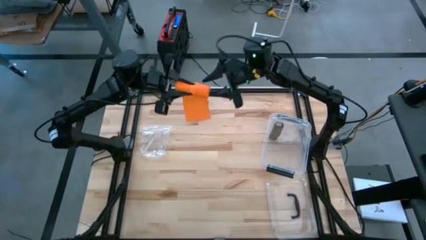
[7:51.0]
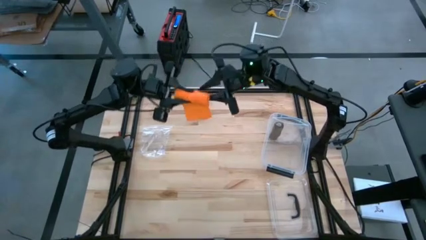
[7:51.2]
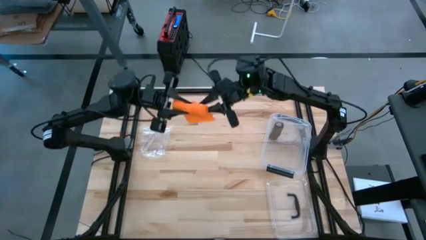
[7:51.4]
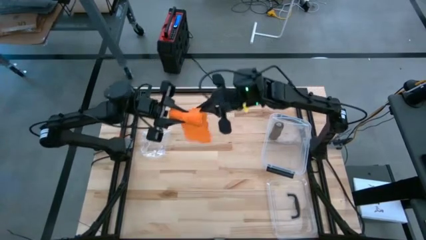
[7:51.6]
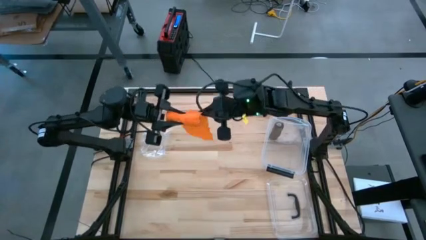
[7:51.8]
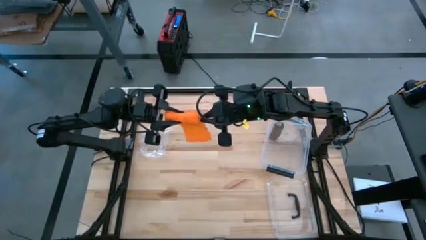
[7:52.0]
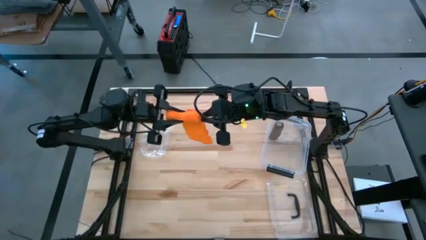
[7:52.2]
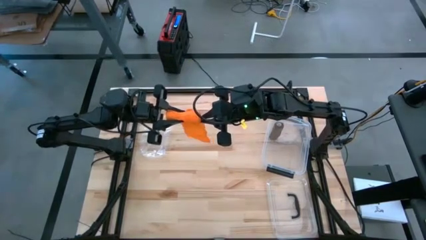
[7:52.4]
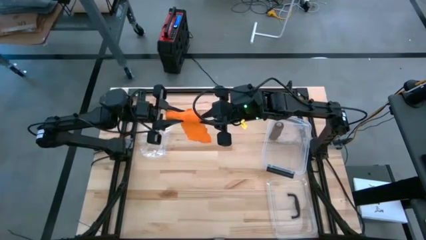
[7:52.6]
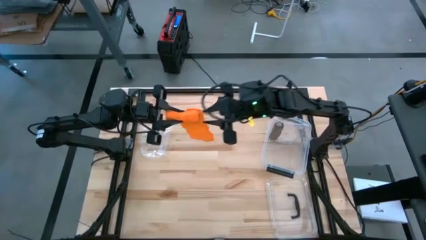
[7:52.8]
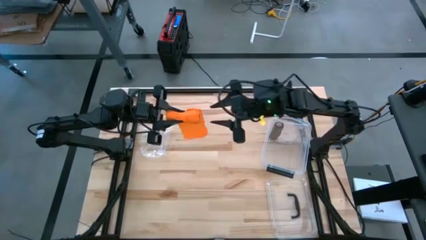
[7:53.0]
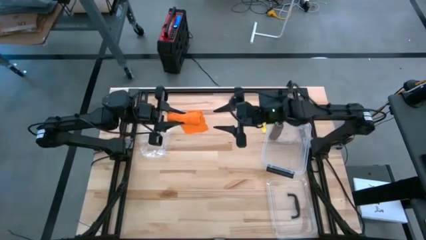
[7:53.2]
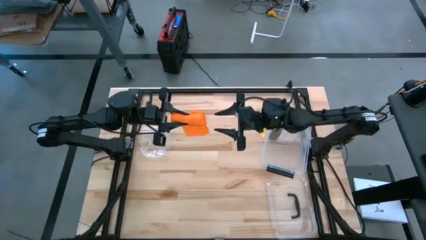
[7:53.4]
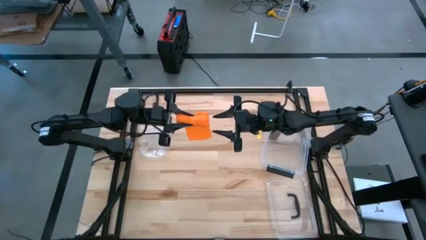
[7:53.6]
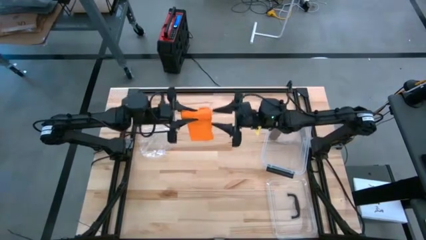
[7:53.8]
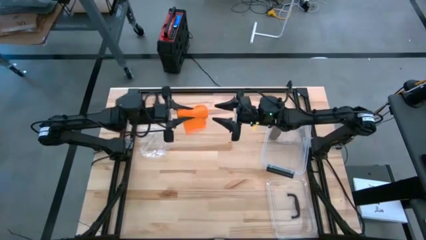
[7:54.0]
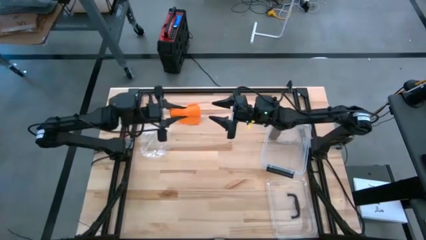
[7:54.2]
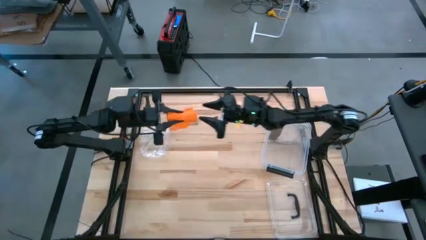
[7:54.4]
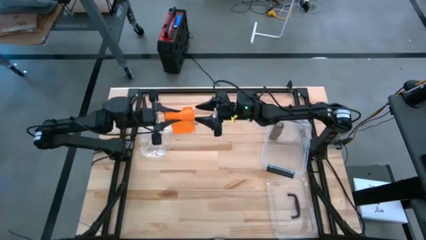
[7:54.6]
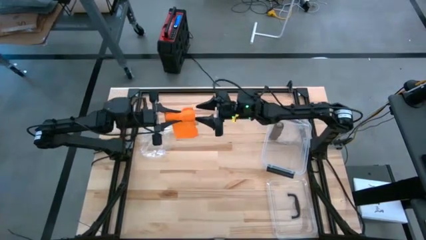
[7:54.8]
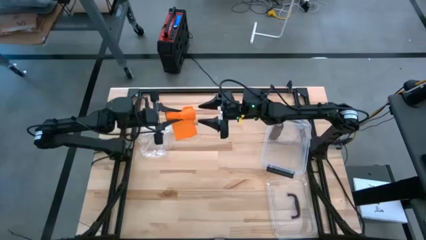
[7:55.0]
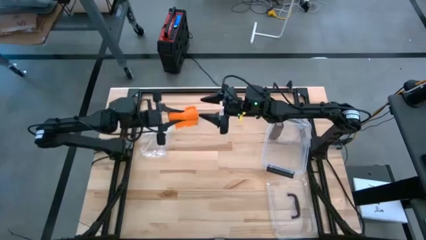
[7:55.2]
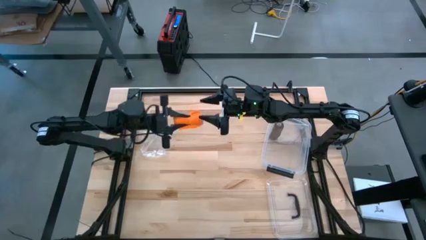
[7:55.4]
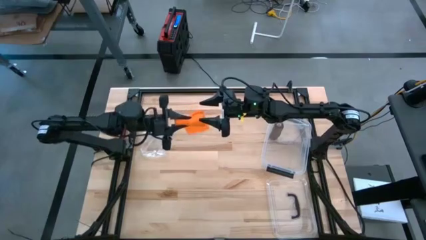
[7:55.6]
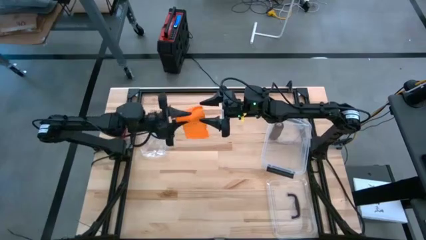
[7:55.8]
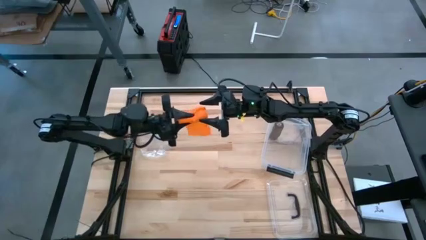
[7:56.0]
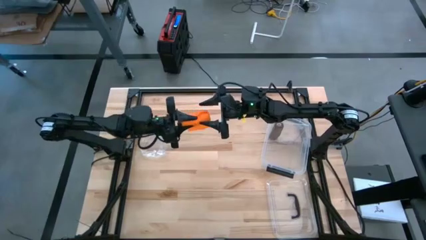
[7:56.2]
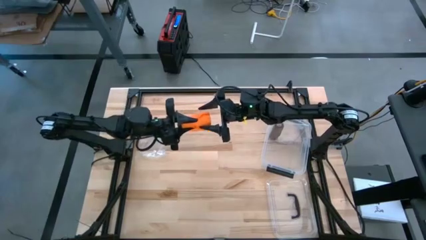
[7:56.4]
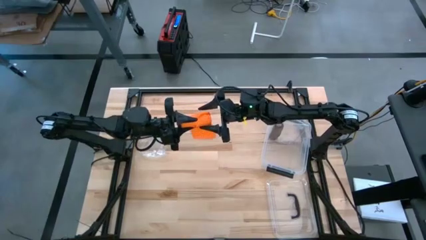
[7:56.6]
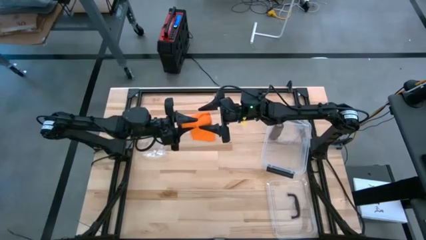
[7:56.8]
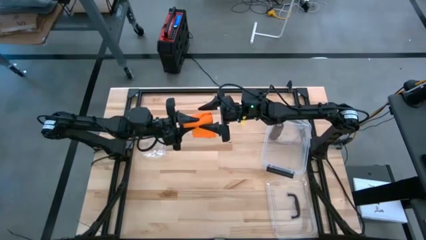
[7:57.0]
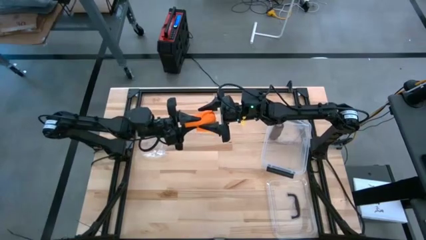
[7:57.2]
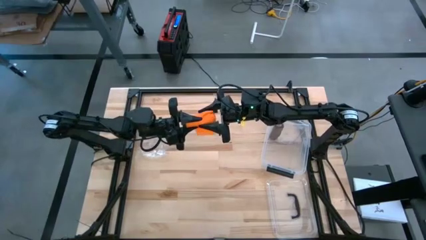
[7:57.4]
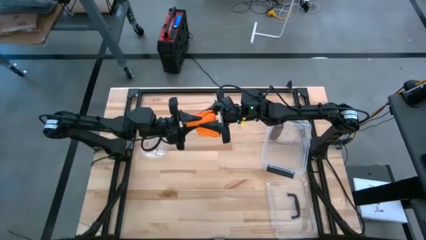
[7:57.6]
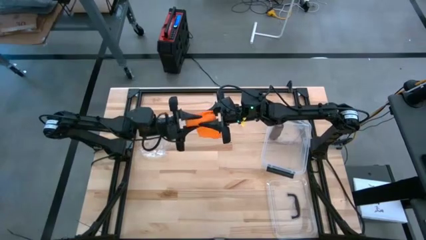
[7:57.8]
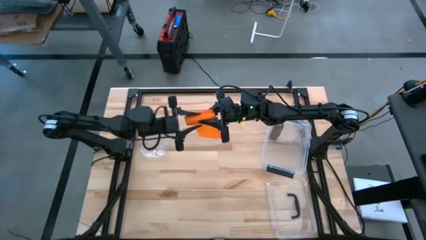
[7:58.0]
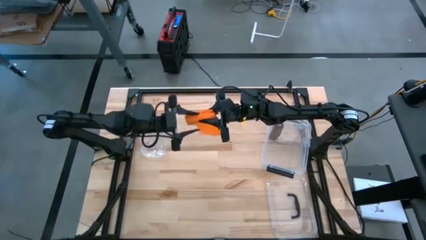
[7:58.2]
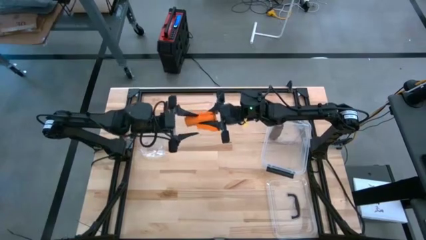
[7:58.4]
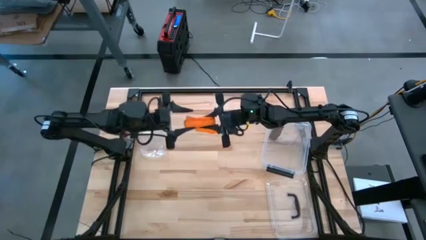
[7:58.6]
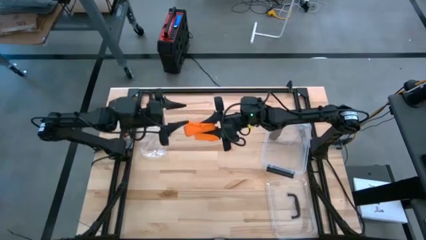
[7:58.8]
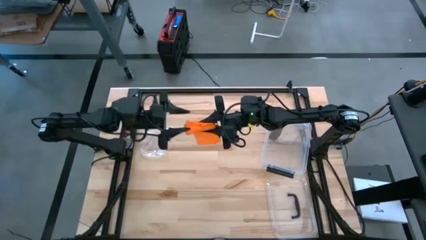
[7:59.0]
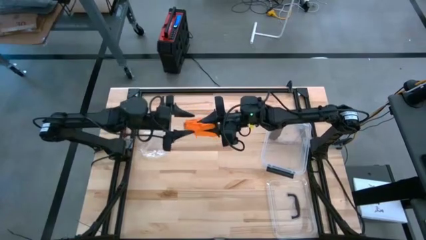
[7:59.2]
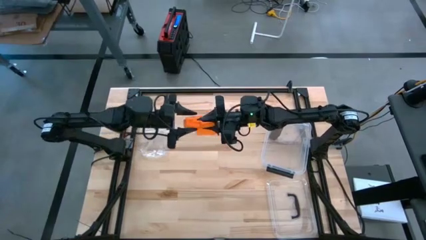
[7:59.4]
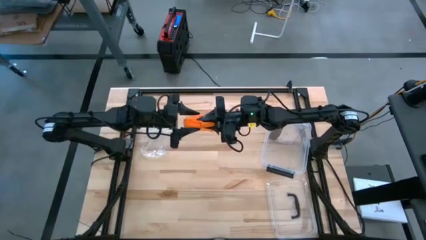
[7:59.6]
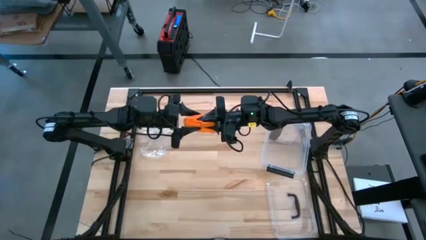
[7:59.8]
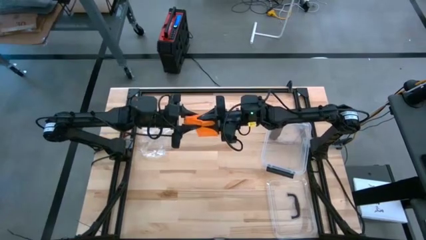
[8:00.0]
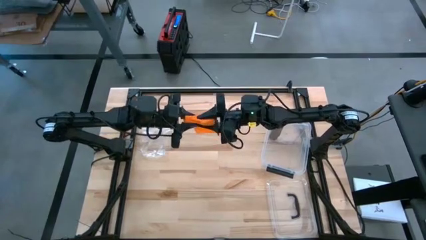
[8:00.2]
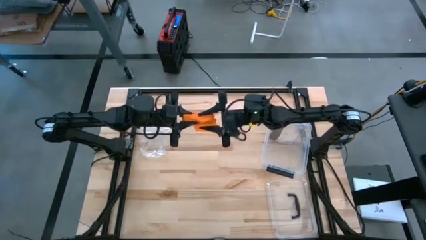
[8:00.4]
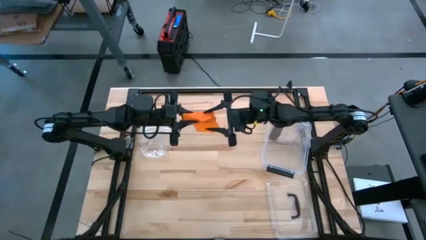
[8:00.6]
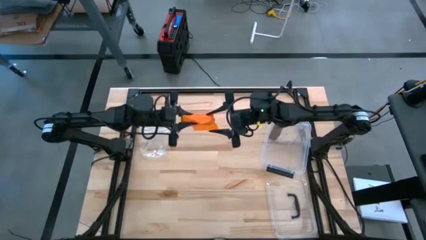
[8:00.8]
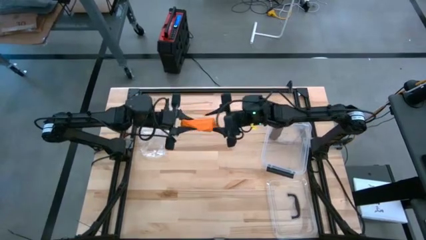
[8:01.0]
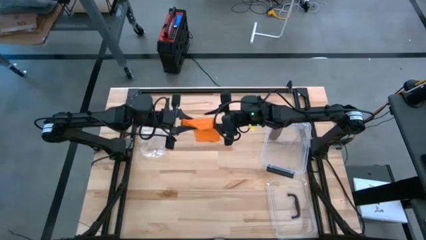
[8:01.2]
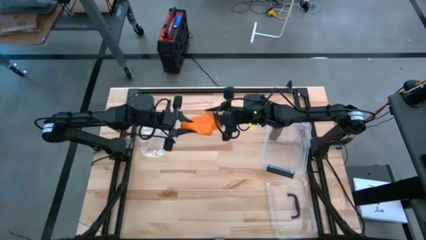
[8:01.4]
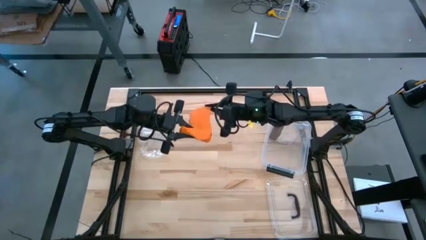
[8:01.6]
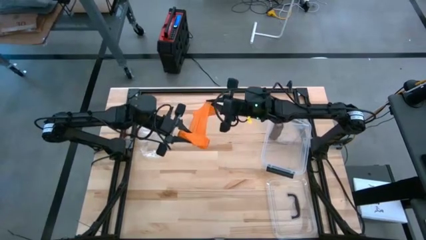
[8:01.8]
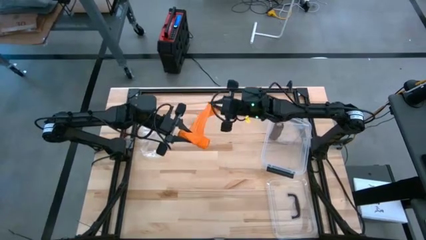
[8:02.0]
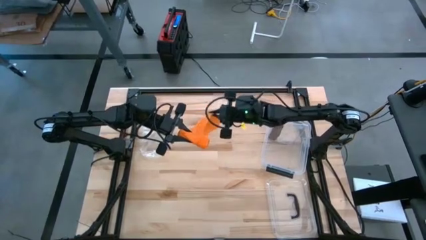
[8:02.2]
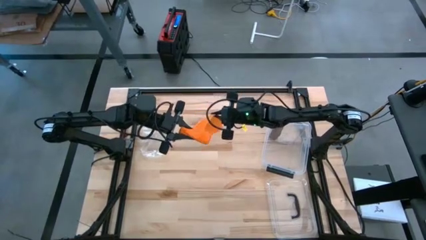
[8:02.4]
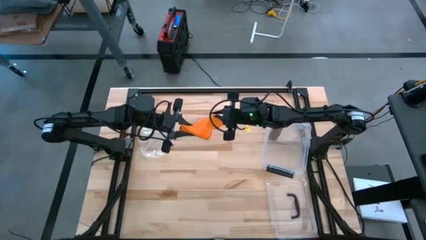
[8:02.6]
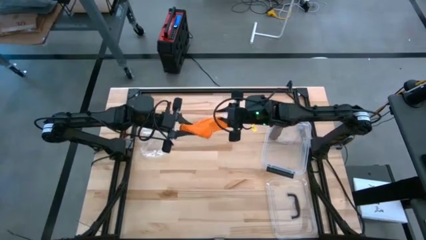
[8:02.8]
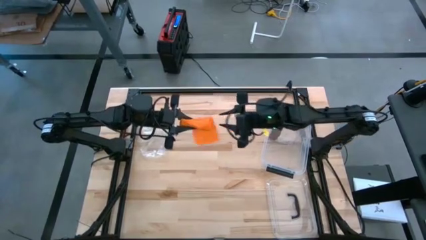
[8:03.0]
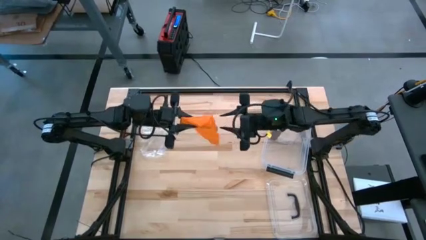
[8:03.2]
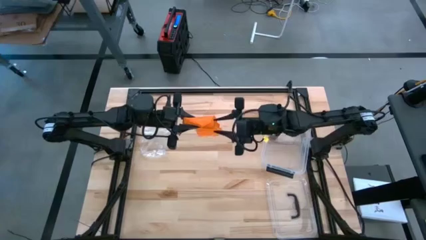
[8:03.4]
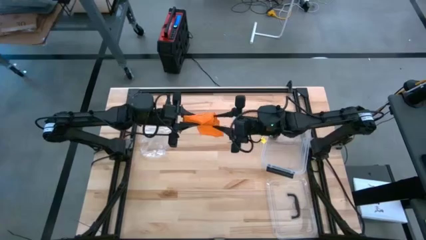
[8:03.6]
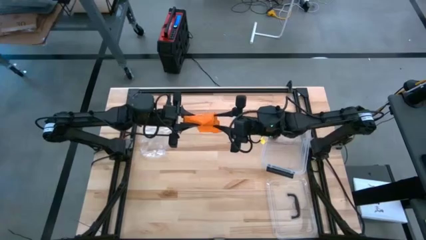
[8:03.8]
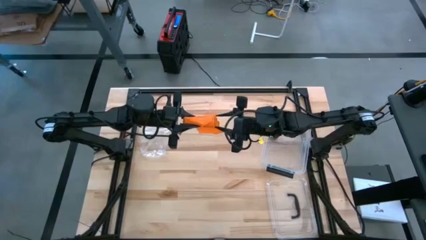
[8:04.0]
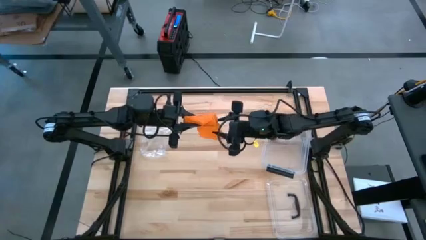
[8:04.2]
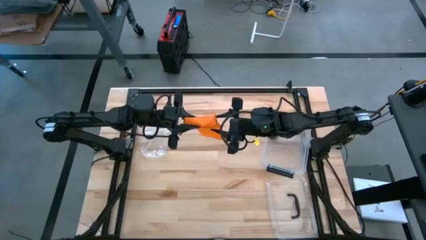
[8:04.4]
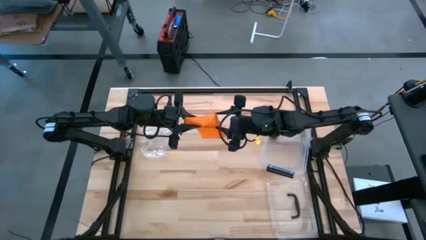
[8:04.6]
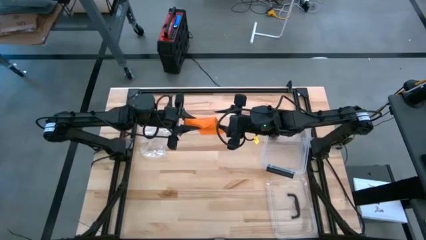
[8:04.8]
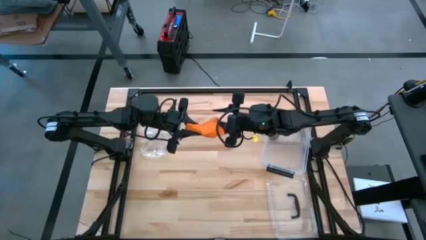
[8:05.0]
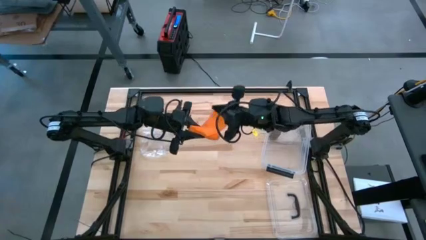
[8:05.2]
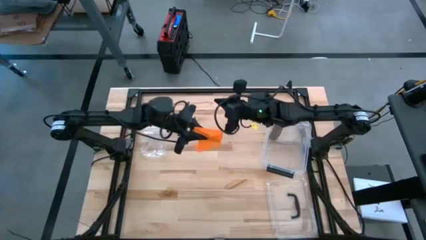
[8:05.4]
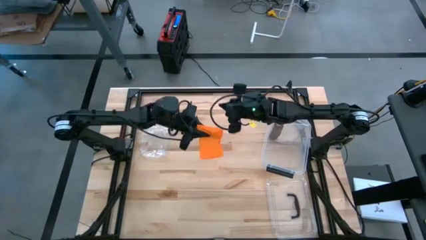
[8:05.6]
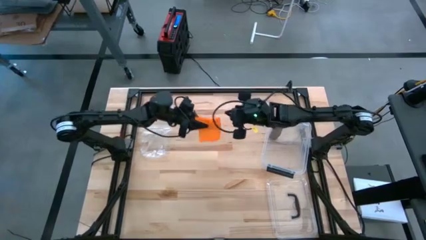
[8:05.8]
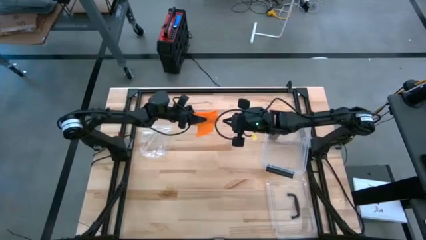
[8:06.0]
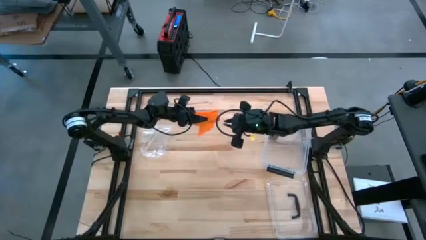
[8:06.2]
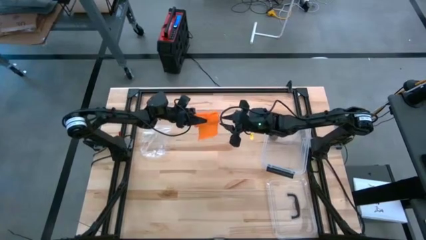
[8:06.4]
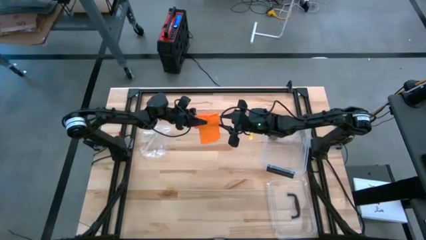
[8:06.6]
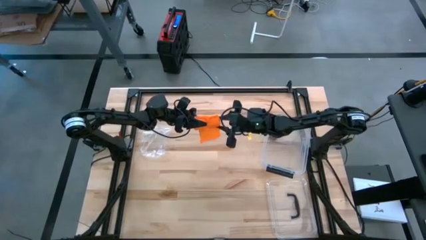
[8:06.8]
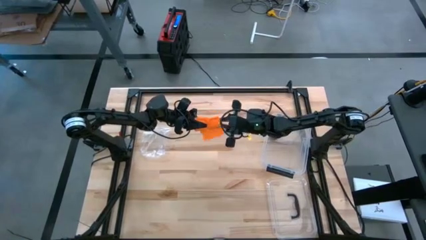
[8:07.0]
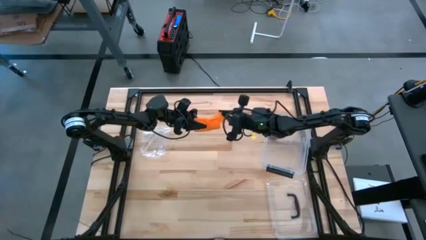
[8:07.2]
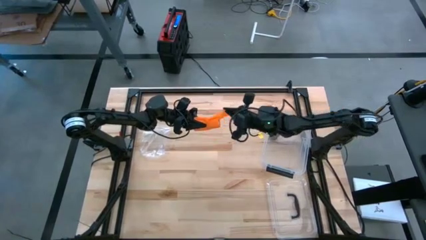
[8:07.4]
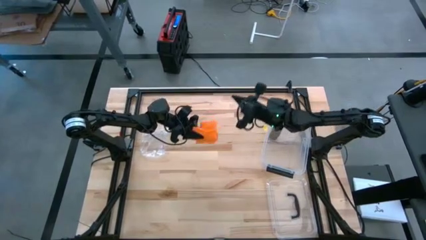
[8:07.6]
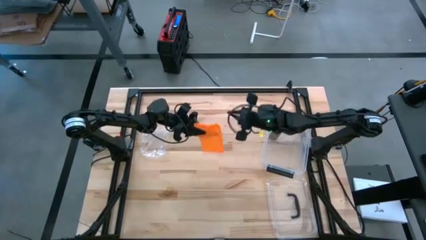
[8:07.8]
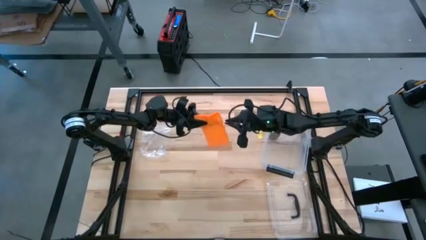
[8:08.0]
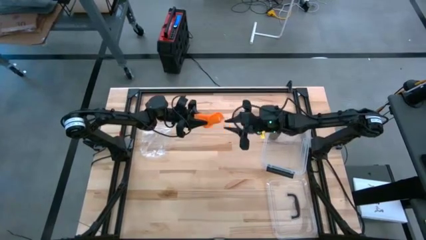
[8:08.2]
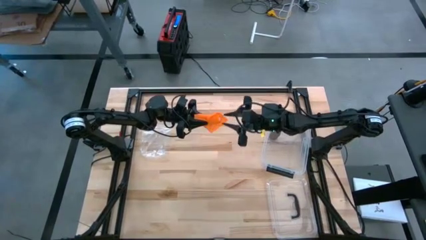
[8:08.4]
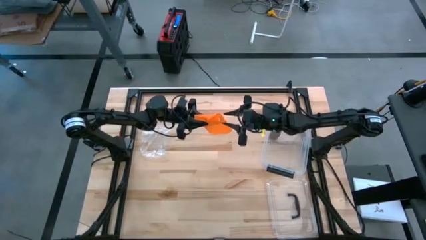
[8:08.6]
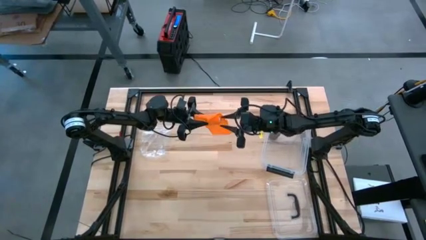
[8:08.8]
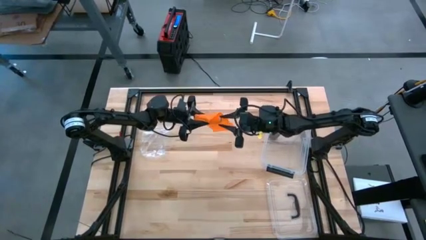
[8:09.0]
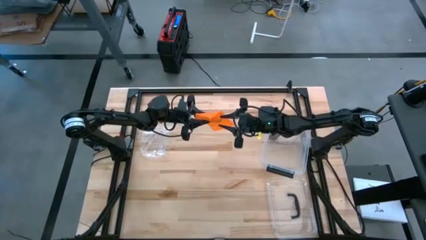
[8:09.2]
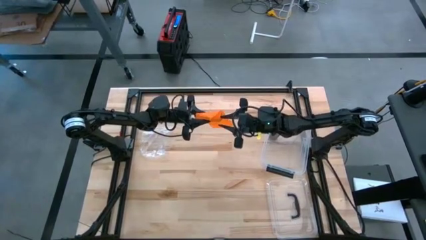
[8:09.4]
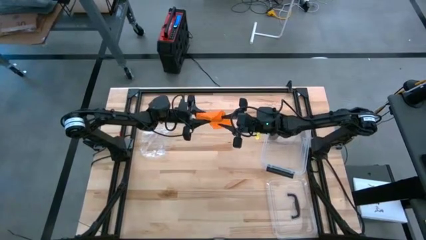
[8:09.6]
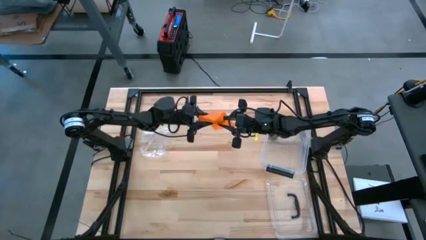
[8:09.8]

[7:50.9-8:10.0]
Task: Roll bandage
Roll the orange bandage
